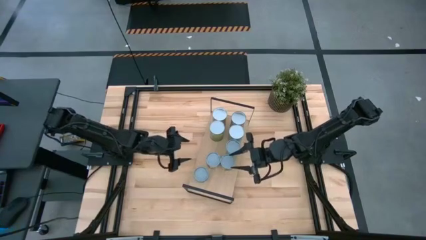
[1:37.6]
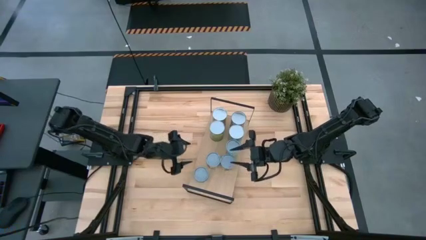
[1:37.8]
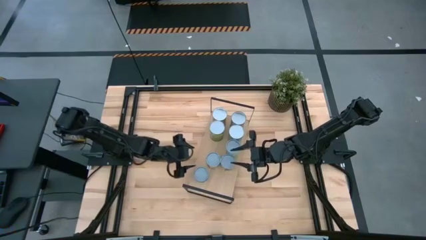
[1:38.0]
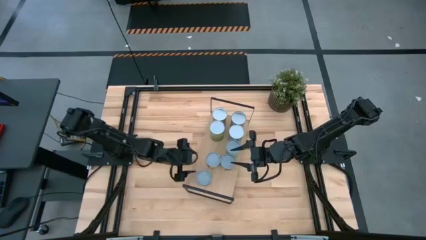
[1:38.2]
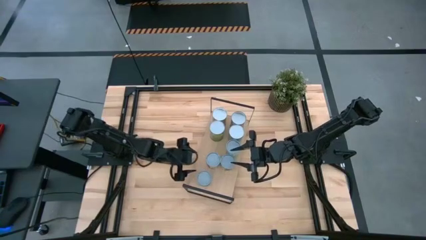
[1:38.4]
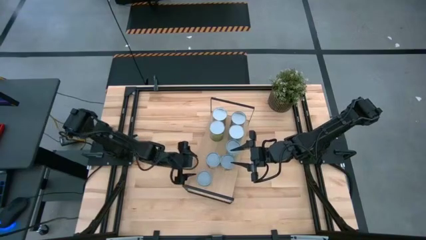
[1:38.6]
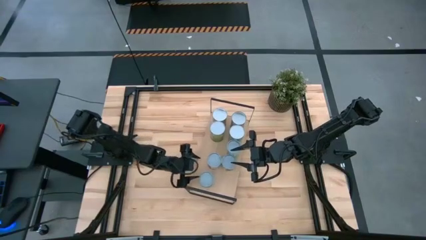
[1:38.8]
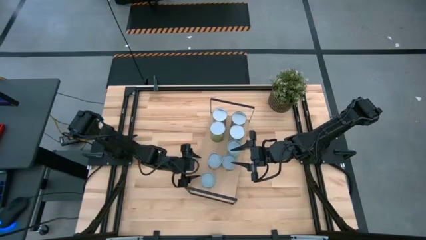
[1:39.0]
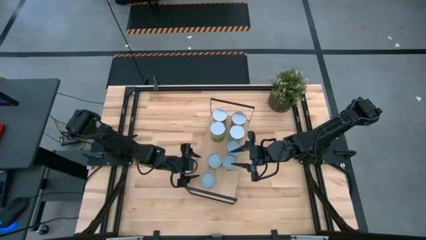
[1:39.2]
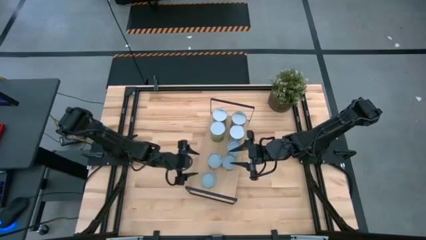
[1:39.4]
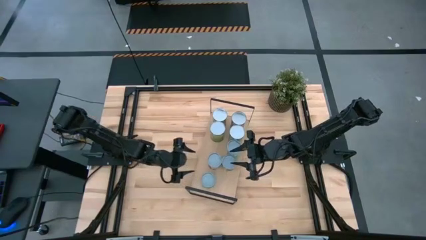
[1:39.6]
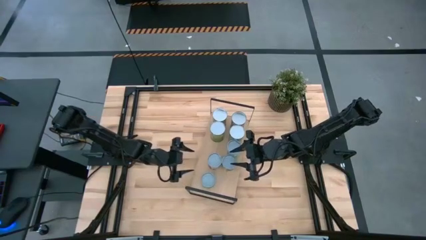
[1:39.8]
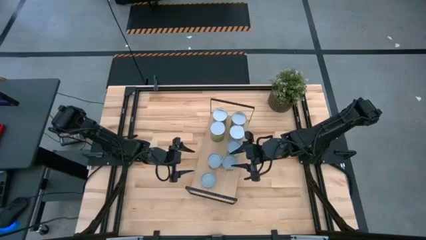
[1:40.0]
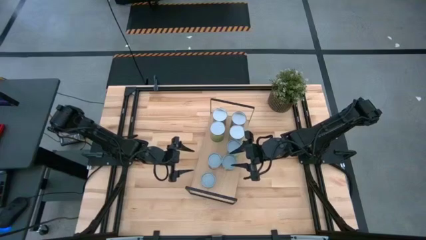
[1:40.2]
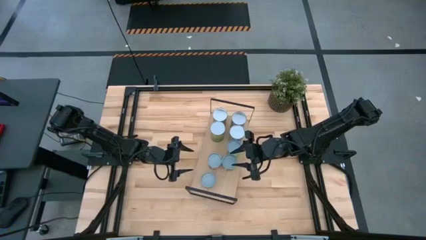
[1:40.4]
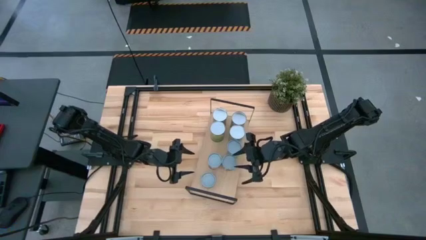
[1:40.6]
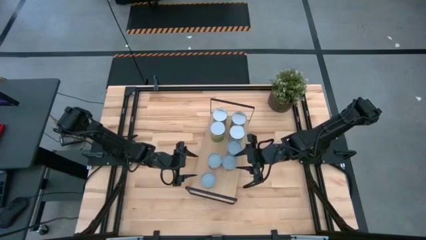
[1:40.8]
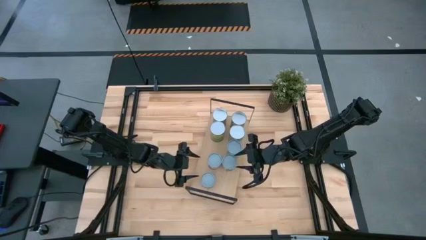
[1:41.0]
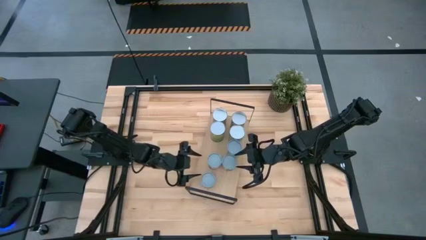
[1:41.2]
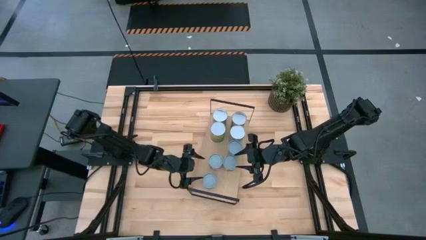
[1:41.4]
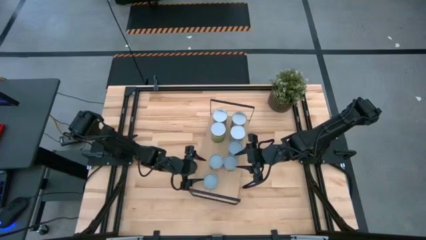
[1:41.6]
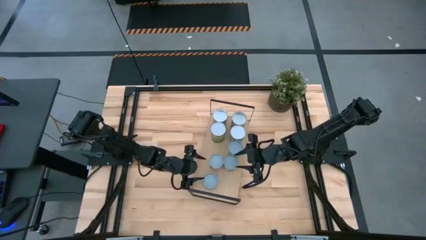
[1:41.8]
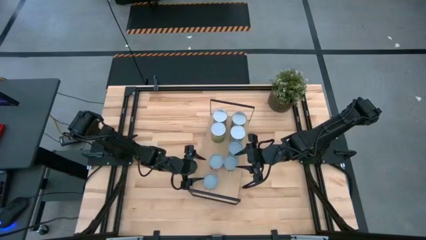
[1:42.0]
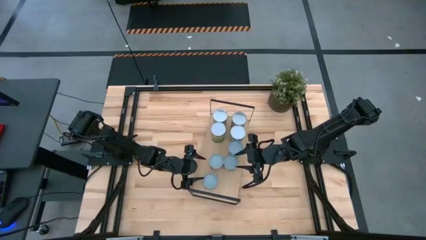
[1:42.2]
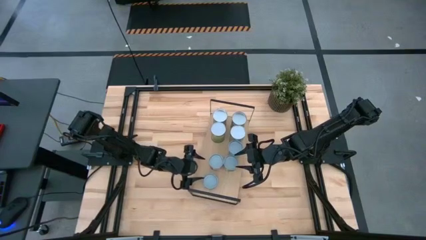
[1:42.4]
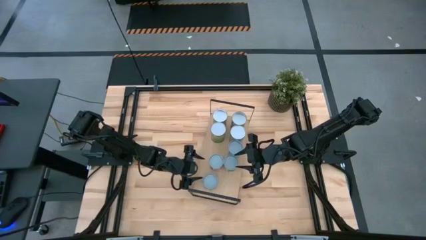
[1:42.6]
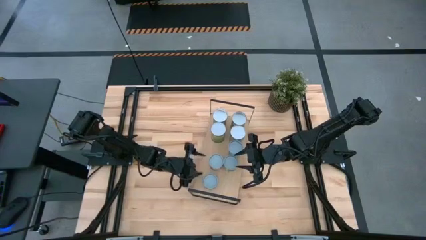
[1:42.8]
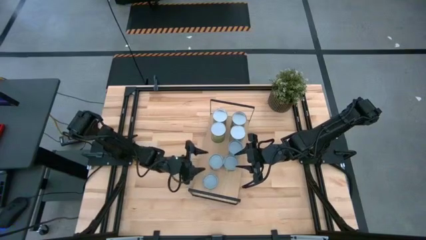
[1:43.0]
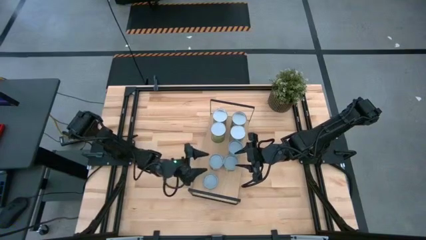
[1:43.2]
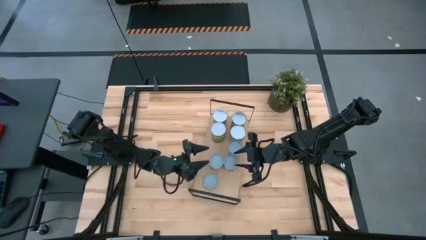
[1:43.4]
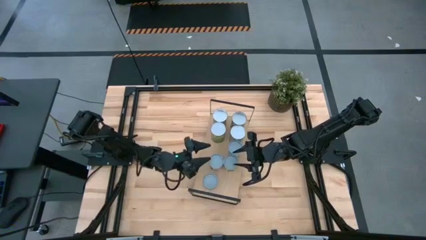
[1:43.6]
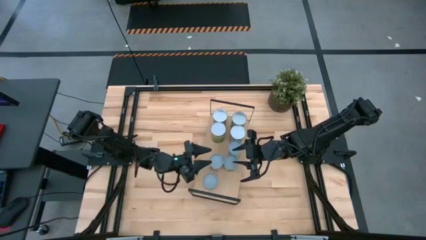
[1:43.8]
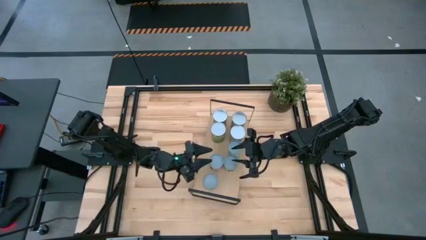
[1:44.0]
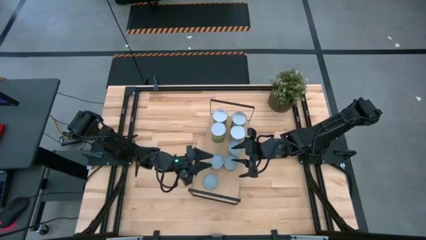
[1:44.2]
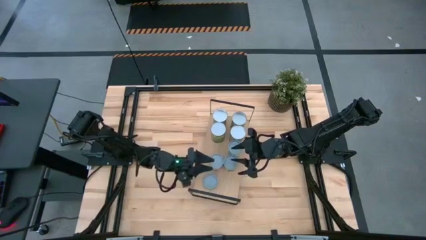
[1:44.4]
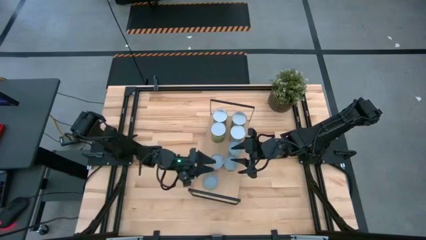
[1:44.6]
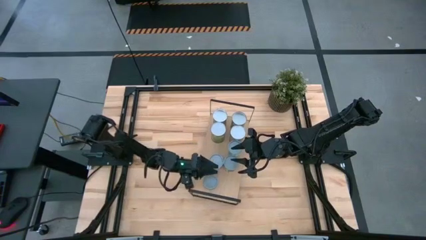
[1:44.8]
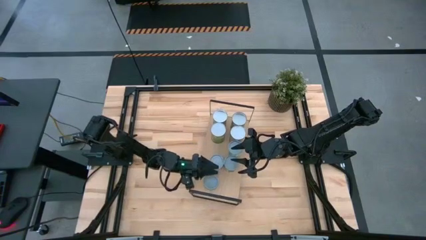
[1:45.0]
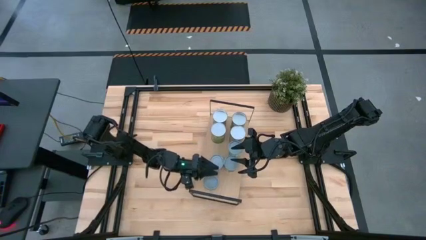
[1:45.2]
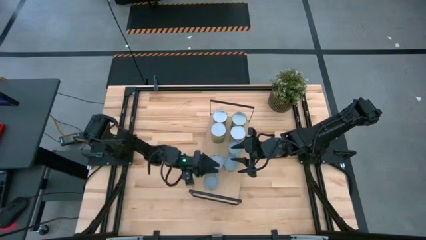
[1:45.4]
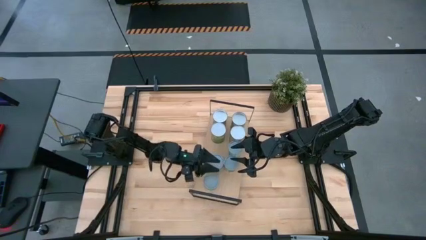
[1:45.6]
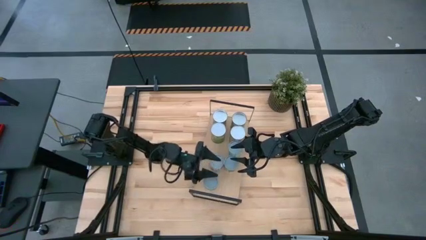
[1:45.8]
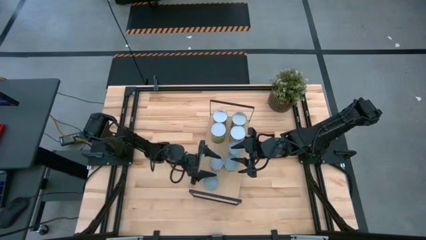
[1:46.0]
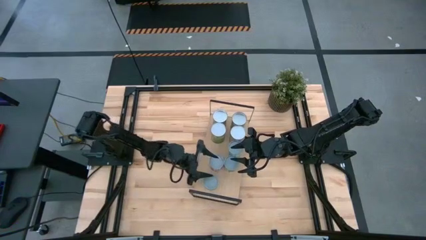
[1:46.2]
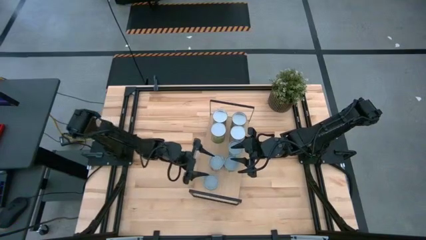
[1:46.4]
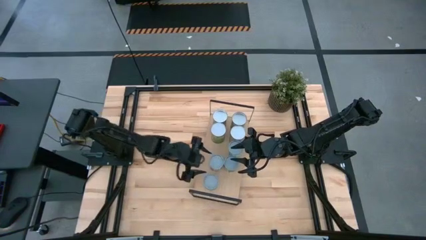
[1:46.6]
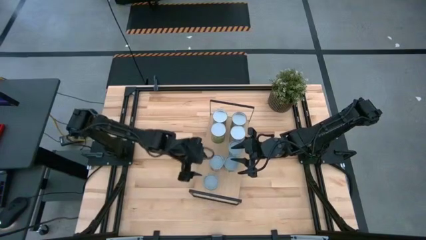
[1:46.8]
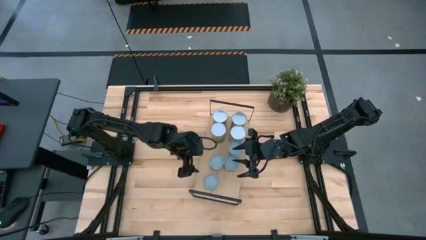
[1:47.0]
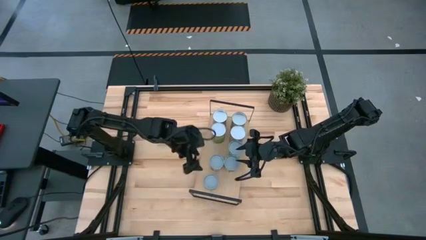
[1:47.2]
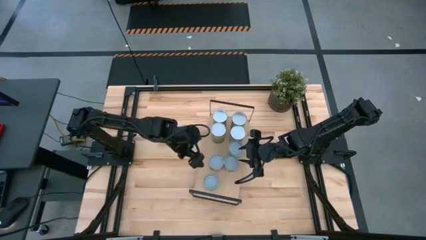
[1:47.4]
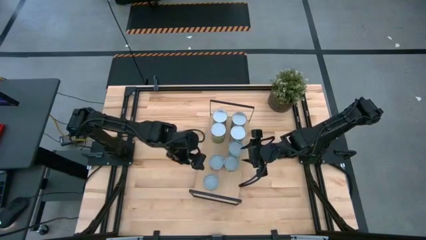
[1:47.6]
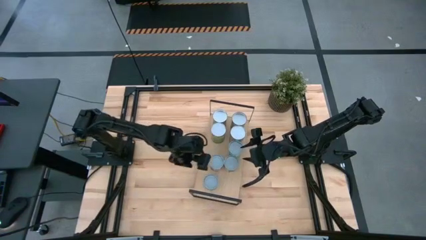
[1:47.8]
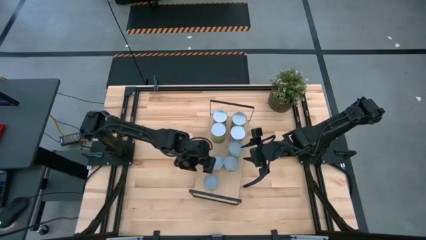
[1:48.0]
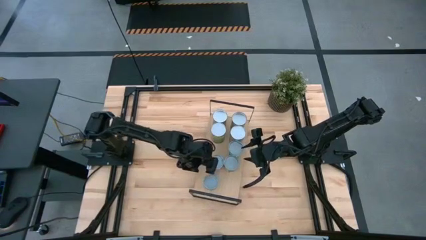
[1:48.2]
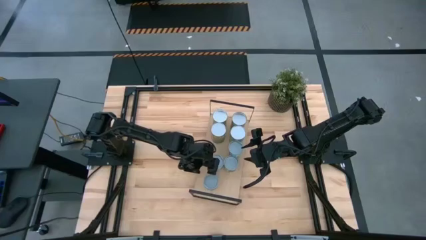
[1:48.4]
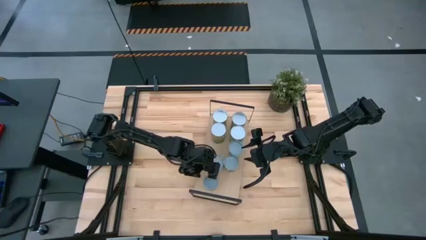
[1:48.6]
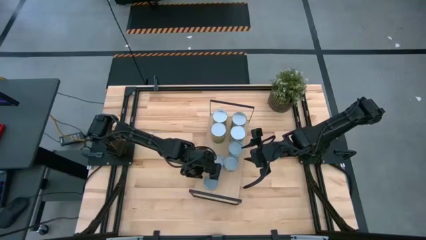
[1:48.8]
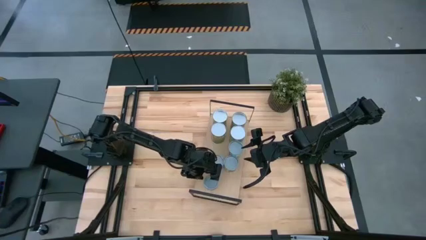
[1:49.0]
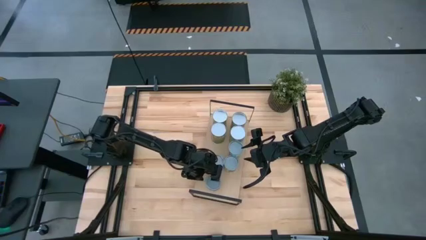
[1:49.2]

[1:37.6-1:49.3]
Task: Pick and place cans onto a shelf
Put the canned tuna on the shelf

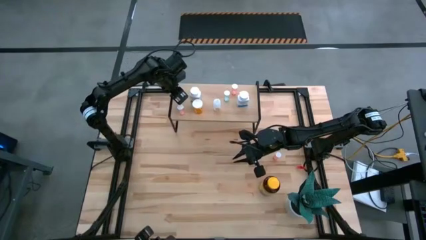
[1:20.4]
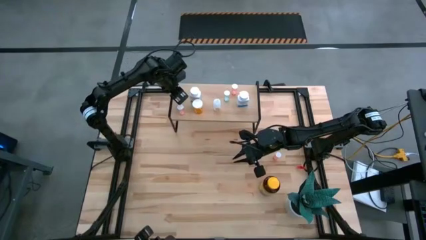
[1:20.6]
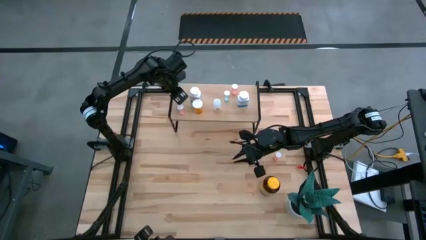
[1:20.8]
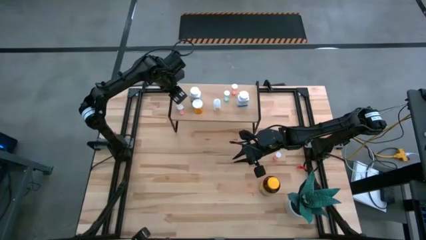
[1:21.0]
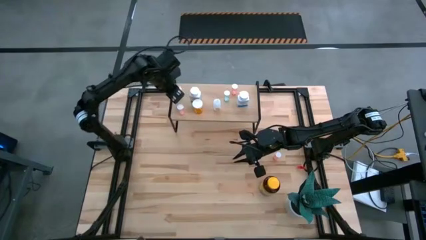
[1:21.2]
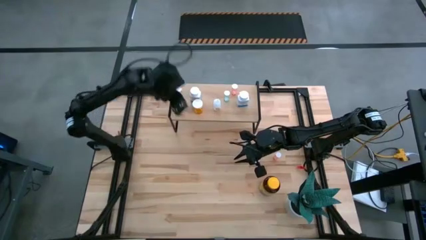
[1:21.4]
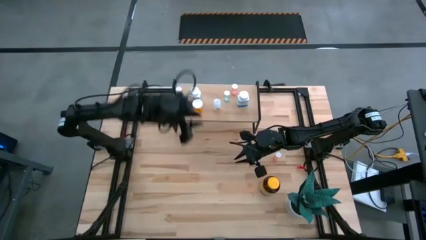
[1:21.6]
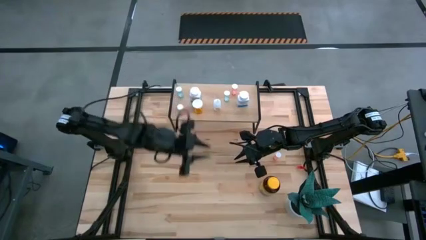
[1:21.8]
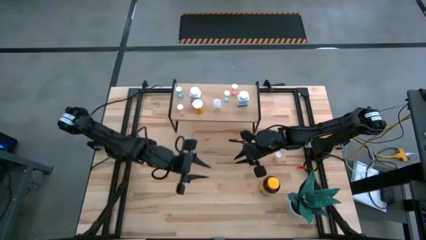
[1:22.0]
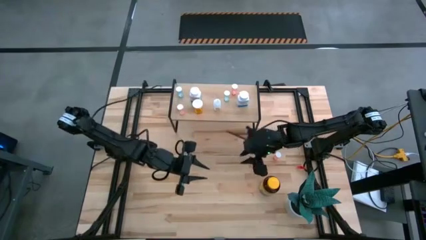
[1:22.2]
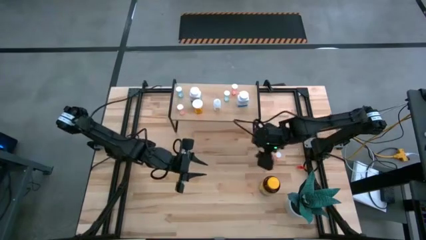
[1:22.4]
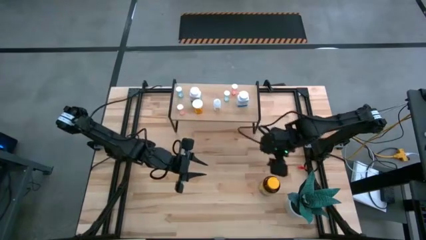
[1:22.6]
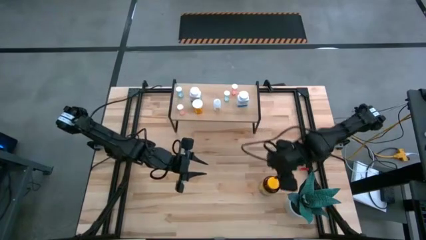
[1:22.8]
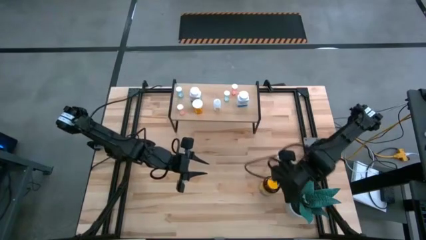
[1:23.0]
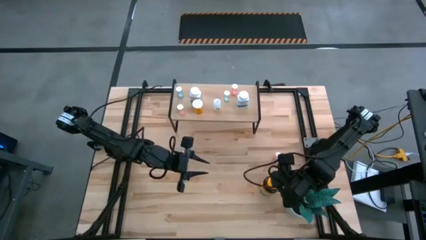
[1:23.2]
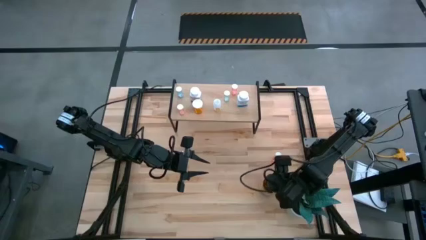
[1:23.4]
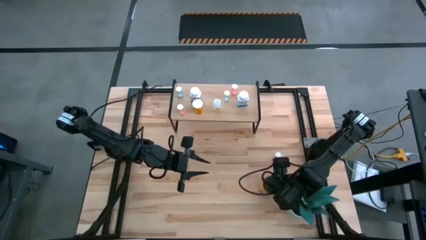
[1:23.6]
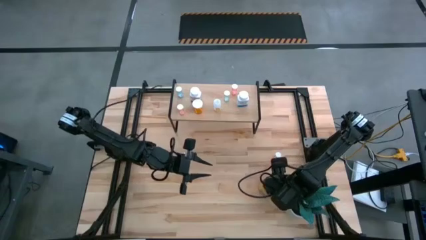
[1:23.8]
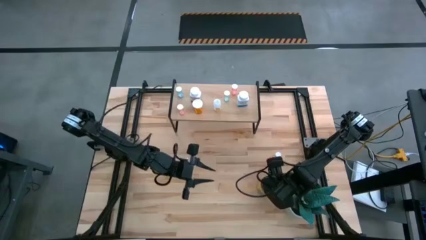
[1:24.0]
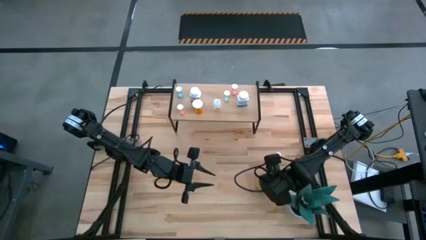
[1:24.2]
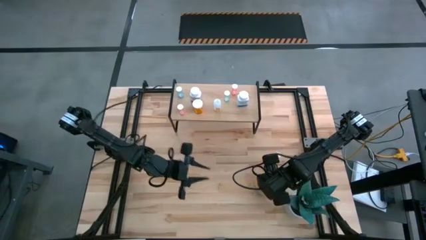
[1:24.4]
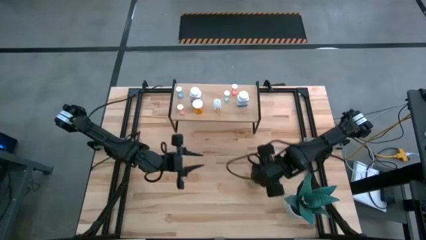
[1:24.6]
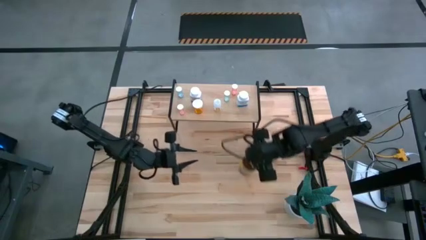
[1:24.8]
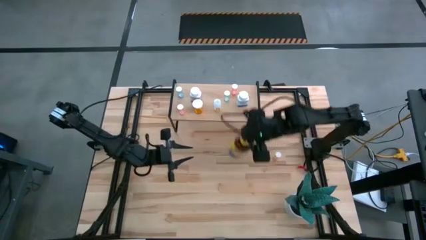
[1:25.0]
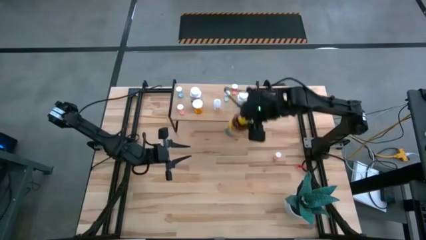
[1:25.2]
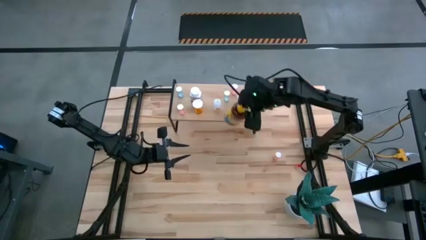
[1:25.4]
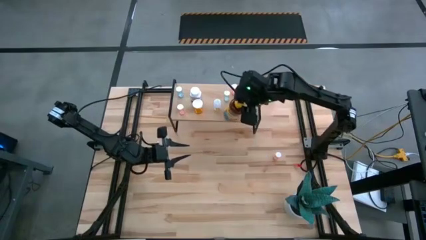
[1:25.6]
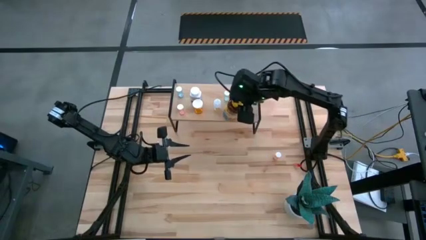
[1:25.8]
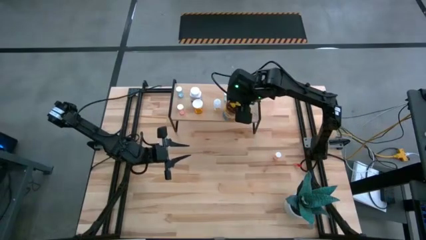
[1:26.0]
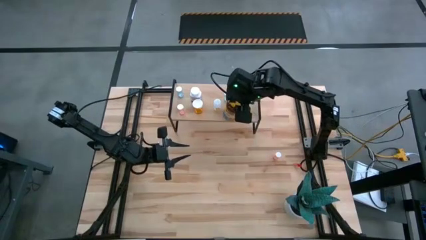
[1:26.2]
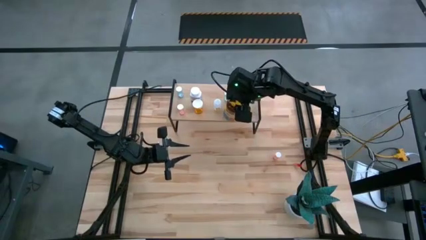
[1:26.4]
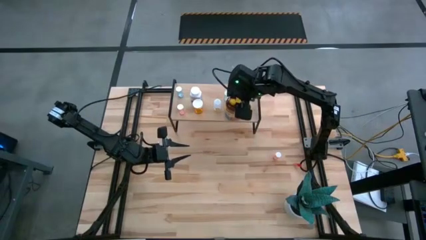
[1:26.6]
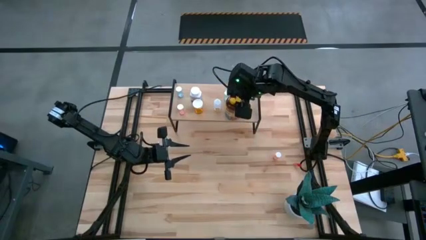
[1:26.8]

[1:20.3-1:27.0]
Task: Pick and place medicine bottles onto shelf by color
Put the yellow pill bottle on the shelf
